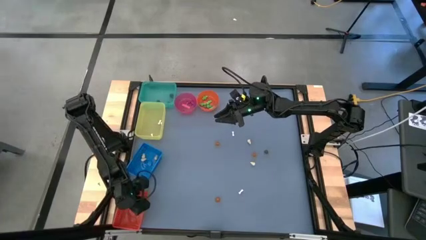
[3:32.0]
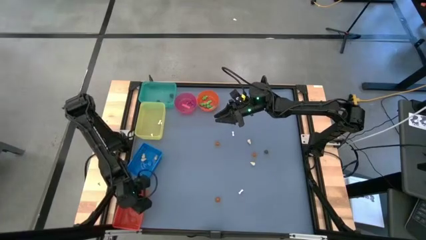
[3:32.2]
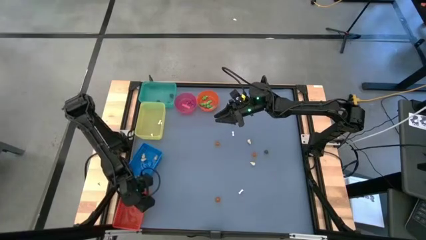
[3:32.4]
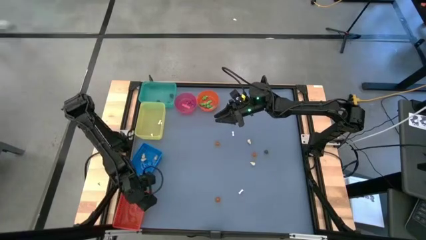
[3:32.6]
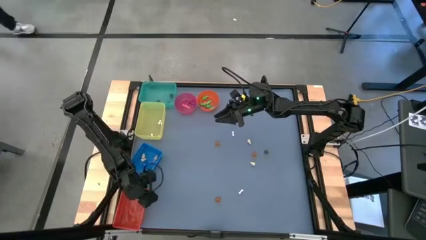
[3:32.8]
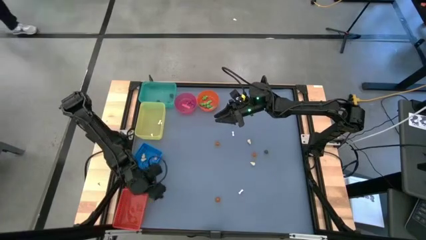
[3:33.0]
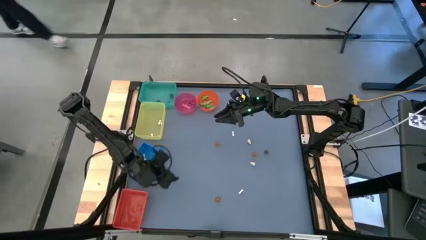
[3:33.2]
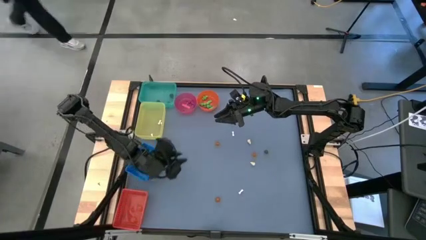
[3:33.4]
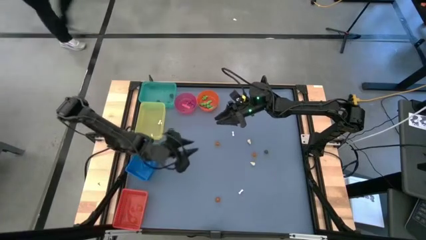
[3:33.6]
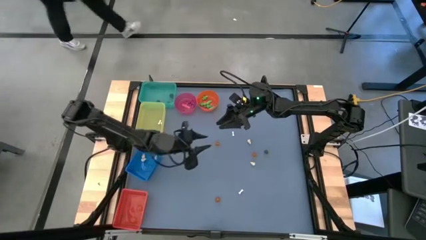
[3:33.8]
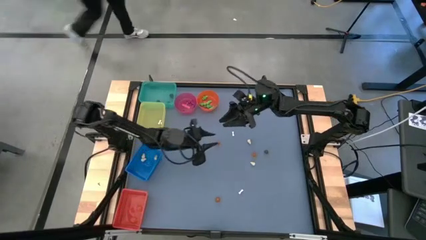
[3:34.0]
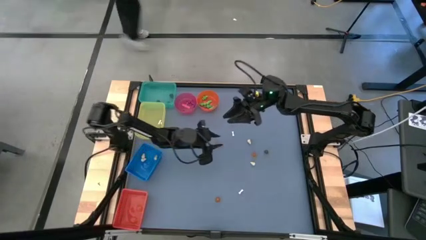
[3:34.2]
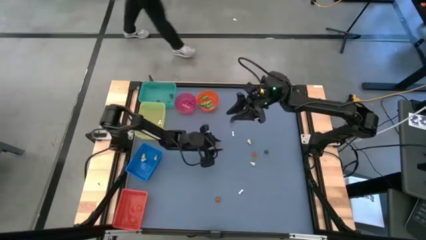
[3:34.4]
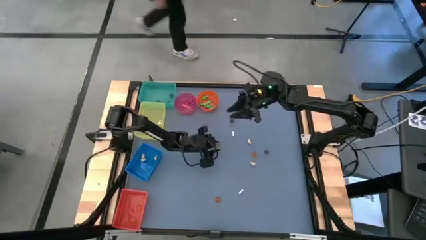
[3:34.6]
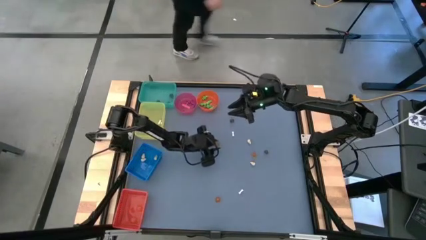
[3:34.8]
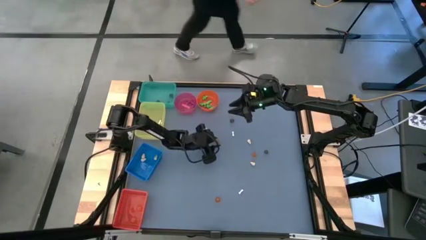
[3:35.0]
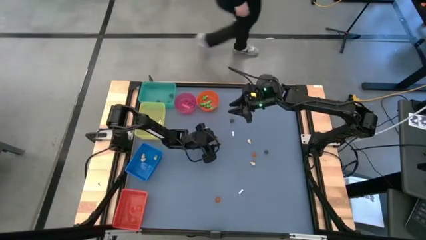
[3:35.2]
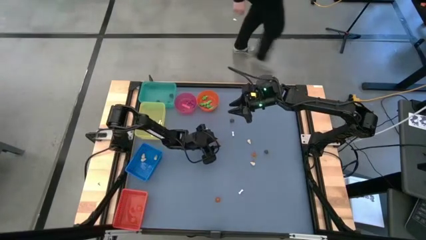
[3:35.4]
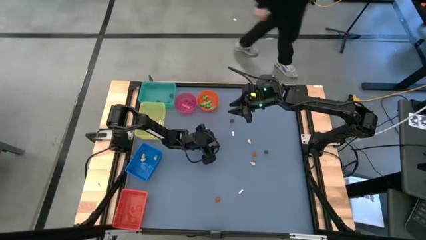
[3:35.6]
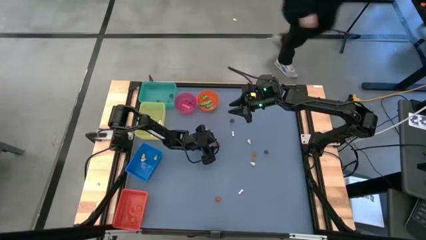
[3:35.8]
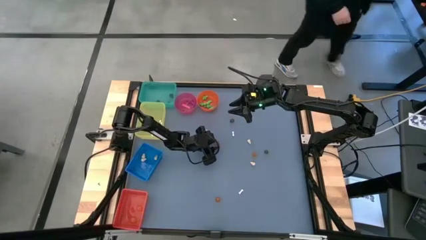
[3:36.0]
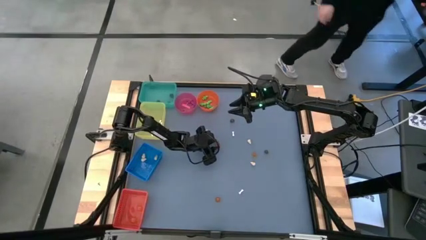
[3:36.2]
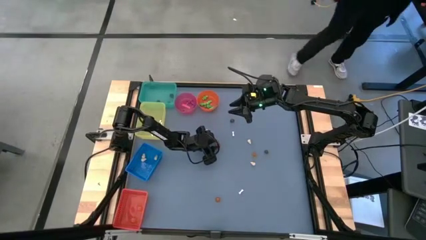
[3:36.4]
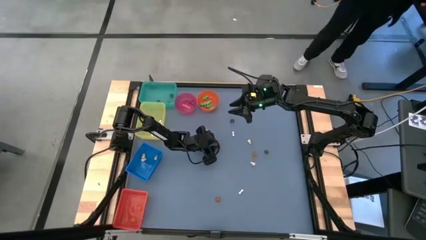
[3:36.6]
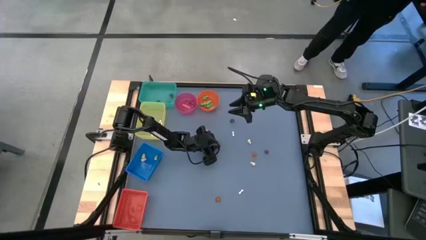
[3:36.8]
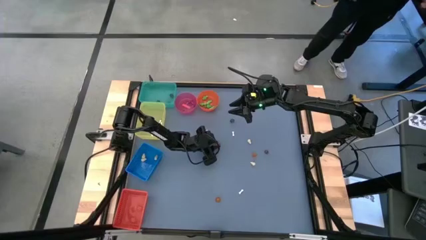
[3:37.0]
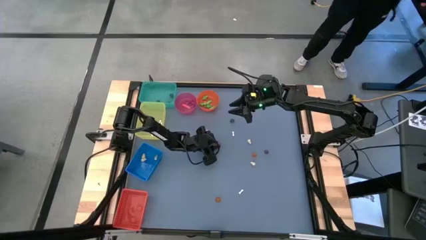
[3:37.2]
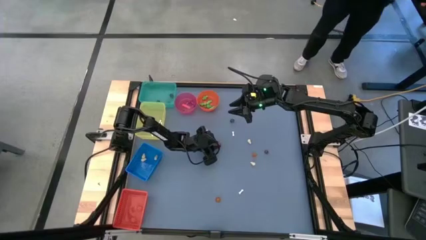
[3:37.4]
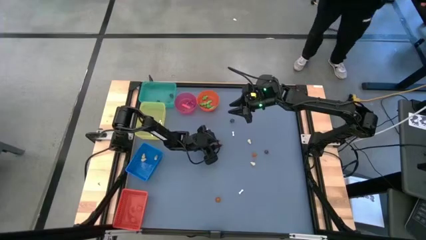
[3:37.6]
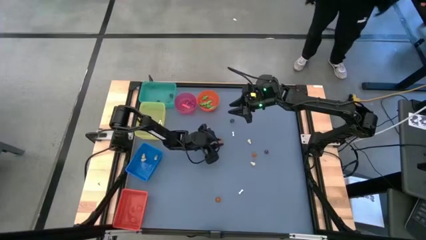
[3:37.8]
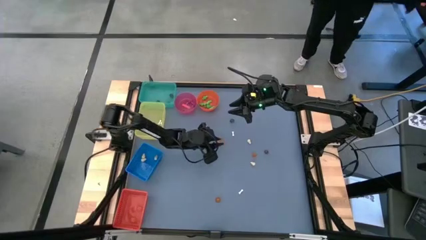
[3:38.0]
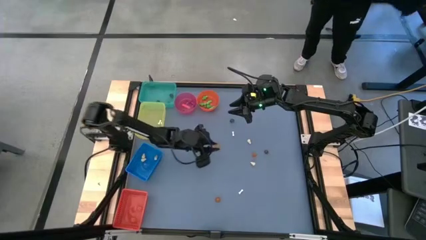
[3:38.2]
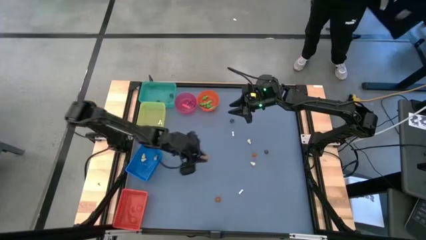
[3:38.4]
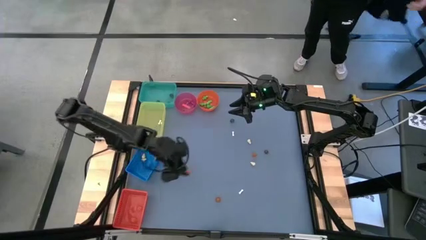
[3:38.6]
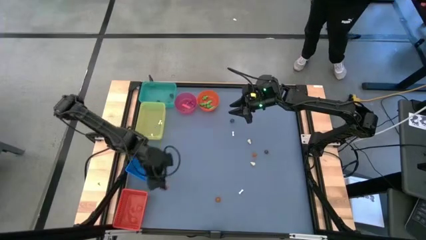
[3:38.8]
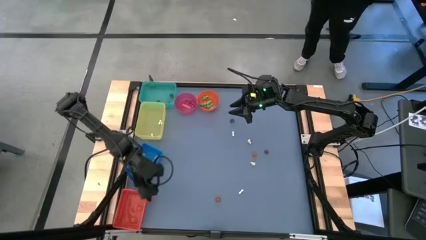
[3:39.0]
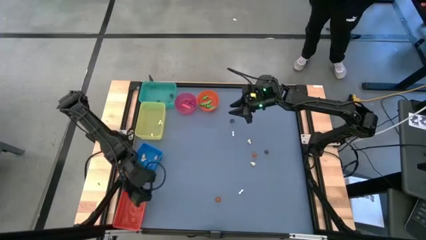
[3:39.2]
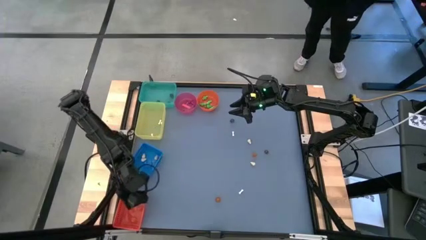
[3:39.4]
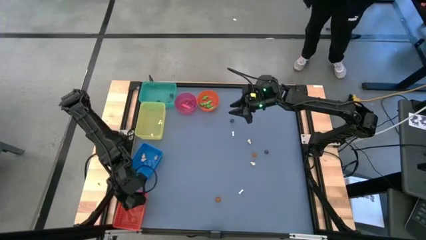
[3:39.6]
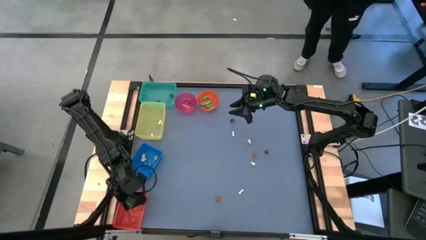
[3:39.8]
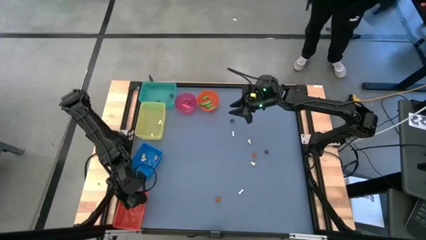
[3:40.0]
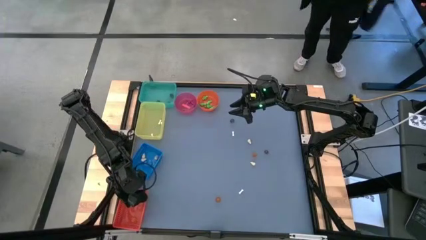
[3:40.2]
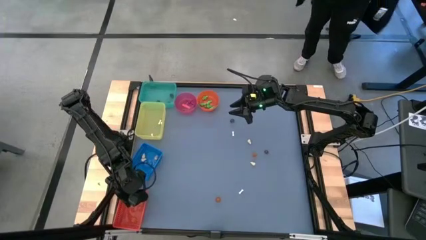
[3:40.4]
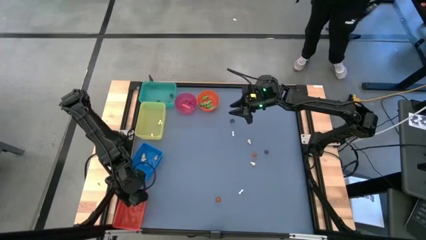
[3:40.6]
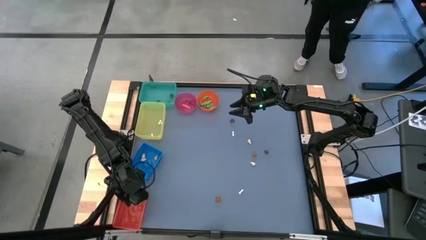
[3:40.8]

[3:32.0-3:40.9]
Task: Sort Halloween decoration
Put the orange pumpkin toy into the red bin

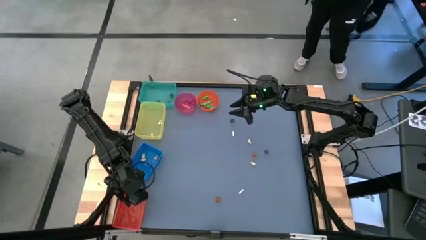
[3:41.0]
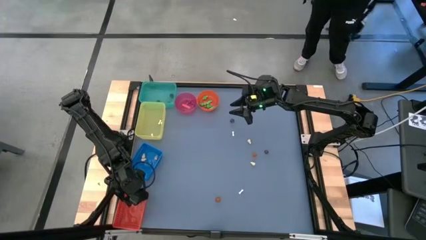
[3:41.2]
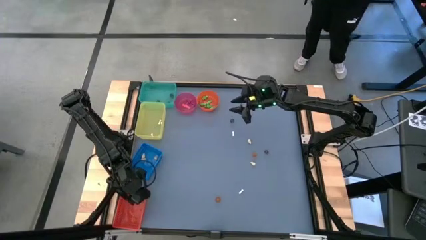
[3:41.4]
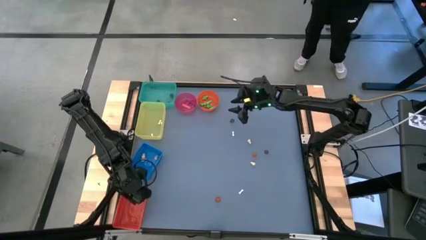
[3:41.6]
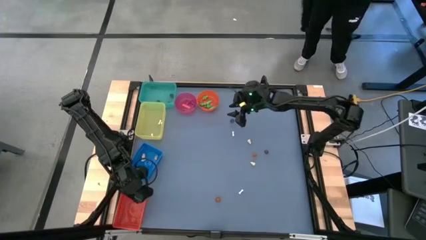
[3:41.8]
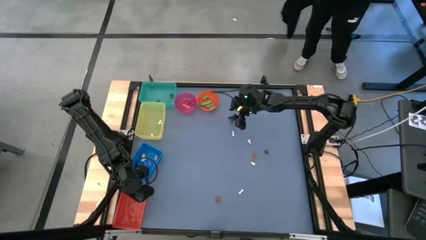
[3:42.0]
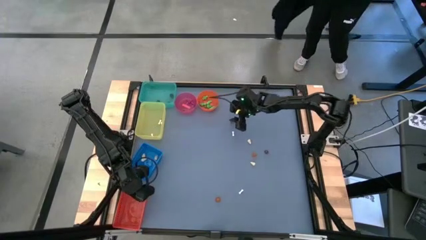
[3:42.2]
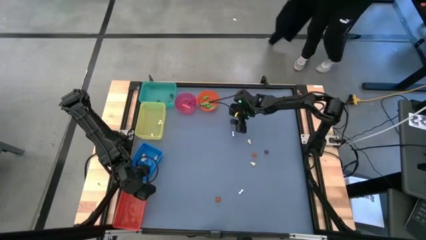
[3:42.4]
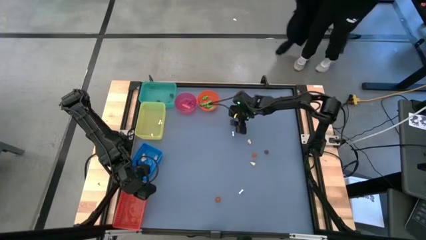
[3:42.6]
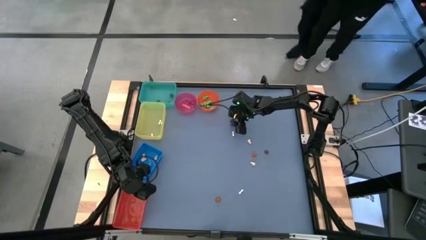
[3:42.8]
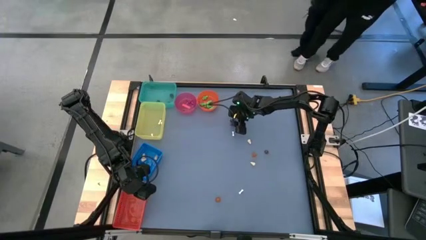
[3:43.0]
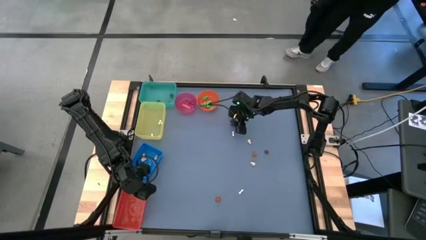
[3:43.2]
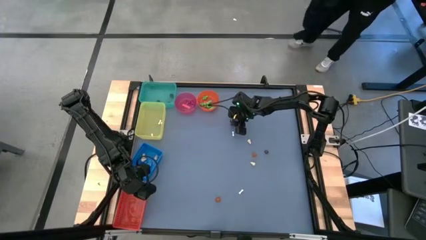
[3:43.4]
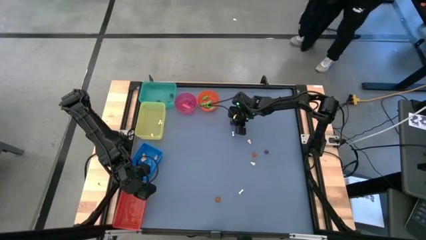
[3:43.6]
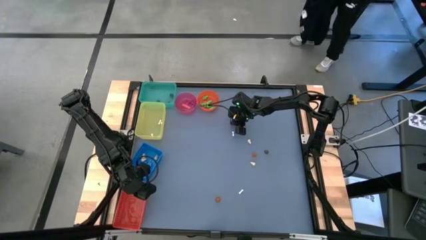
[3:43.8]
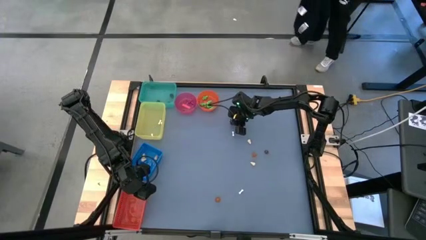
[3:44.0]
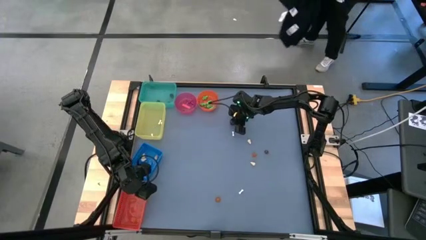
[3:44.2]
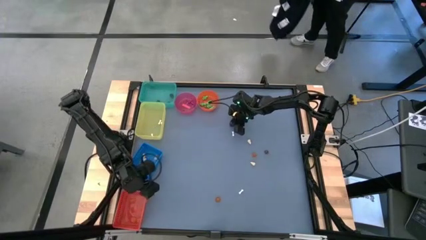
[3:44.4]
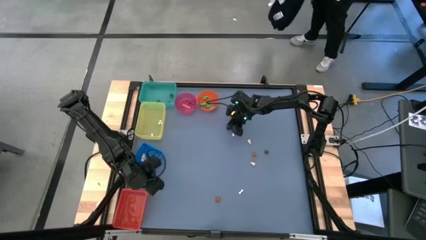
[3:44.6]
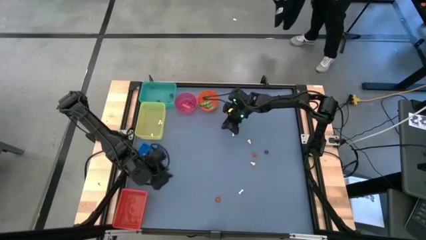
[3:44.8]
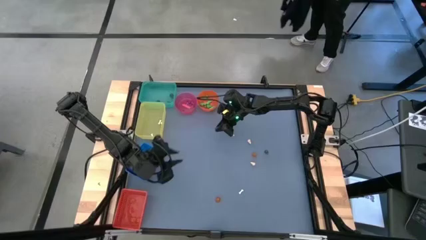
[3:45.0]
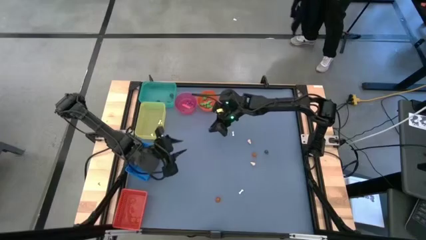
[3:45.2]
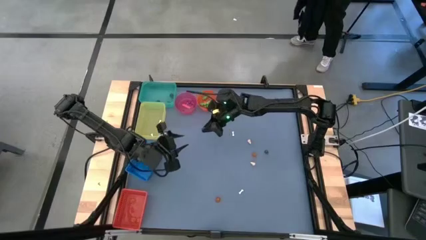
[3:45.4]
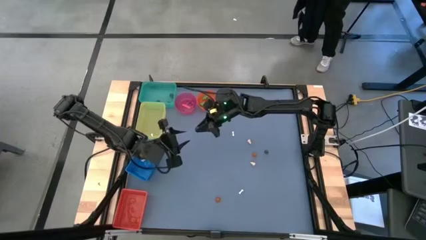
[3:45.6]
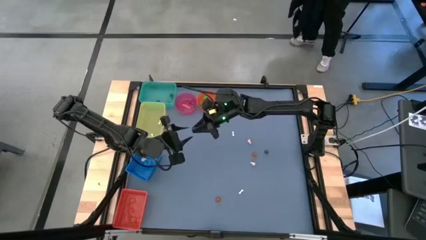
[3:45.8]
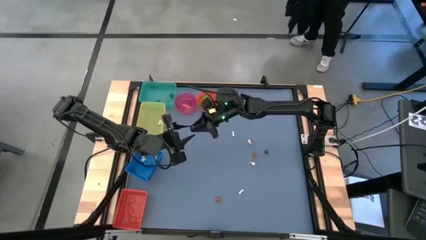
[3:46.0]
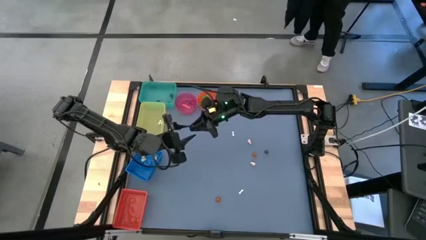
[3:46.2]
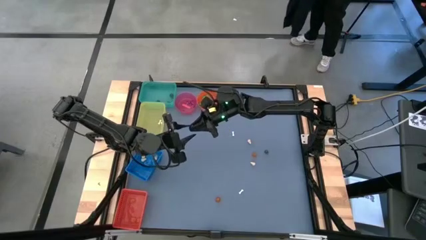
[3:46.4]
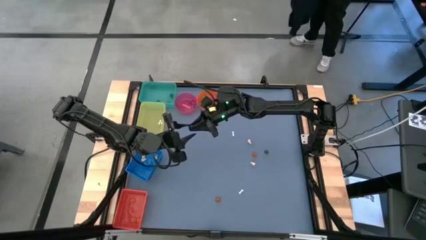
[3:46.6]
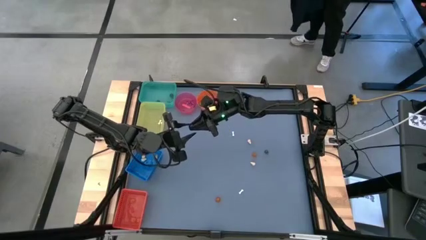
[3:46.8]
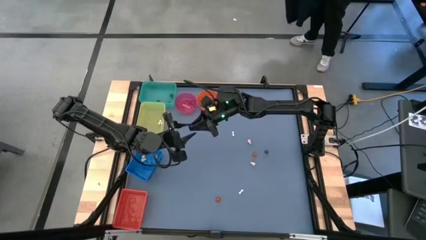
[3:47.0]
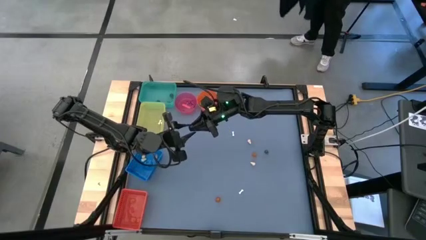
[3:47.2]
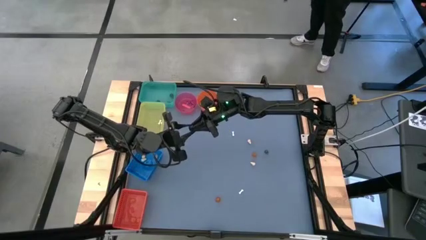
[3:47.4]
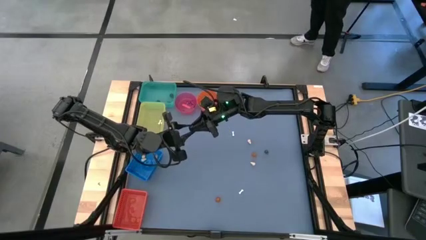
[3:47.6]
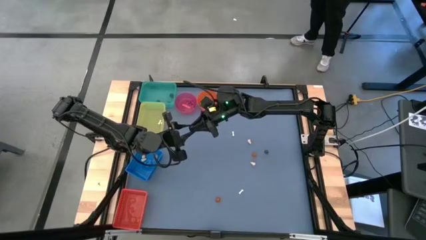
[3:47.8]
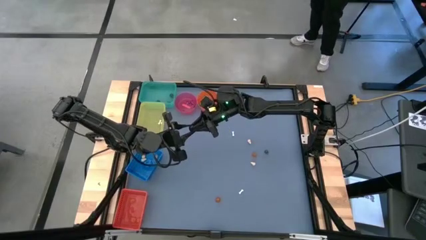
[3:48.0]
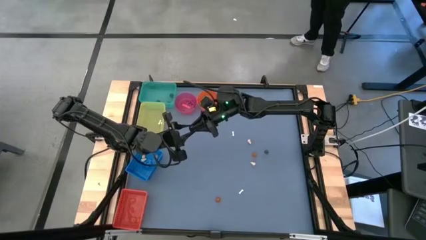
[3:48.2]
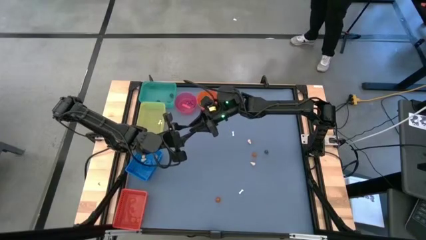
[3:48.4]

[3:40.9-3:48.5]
Put the black skull toy into the green bin
